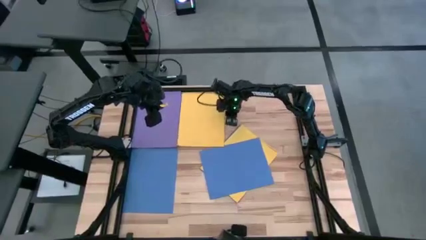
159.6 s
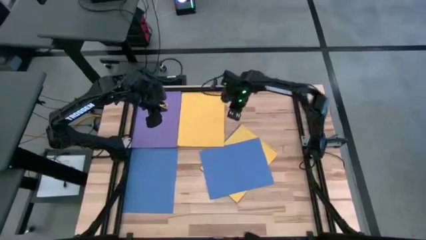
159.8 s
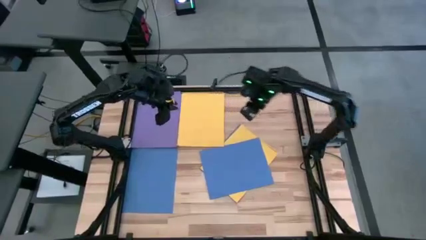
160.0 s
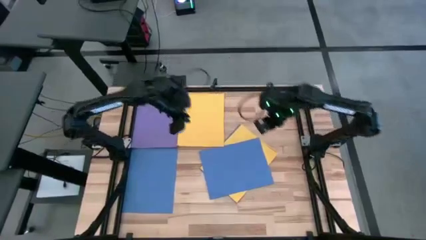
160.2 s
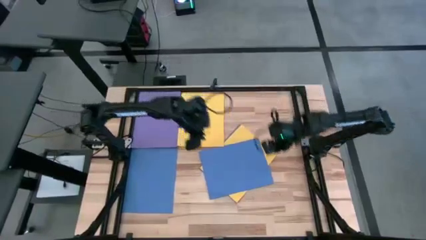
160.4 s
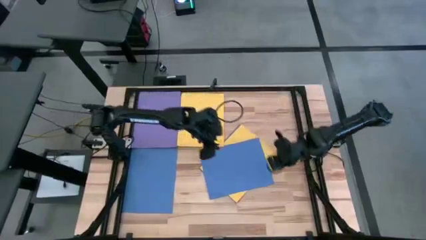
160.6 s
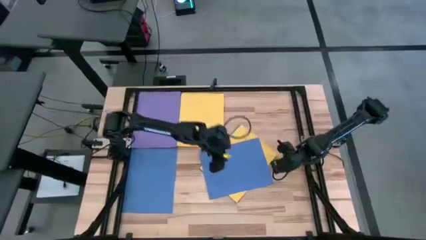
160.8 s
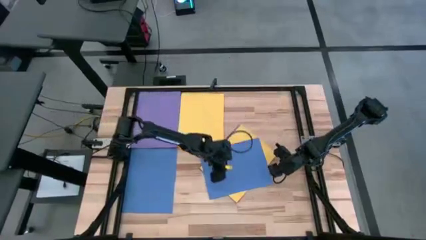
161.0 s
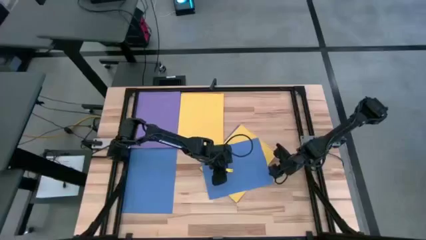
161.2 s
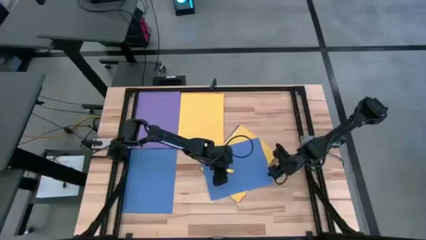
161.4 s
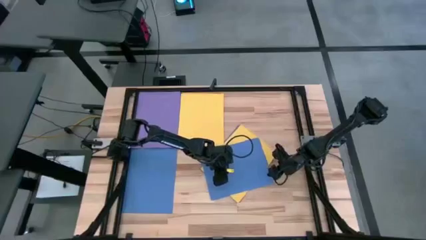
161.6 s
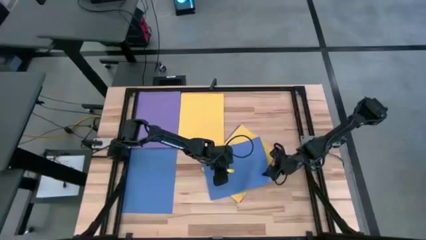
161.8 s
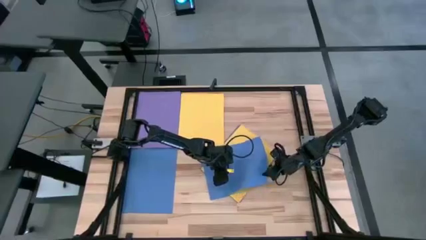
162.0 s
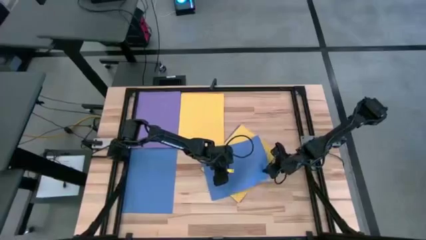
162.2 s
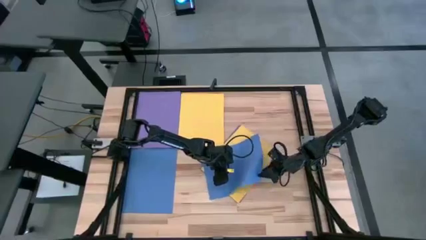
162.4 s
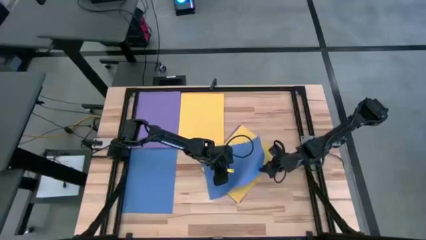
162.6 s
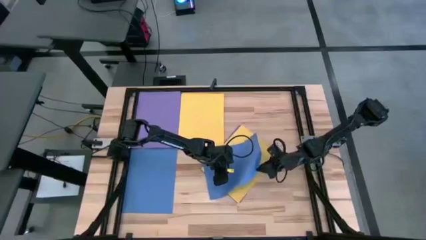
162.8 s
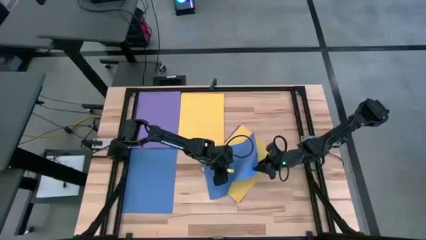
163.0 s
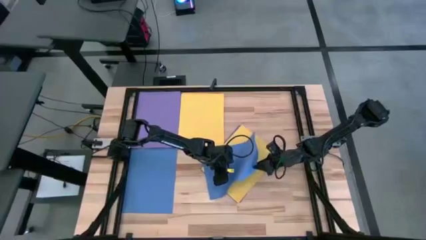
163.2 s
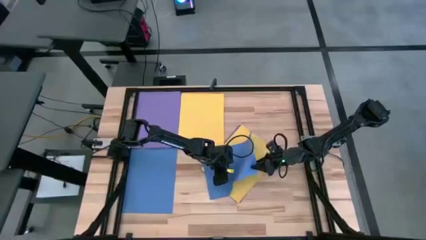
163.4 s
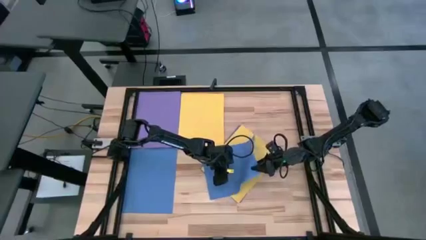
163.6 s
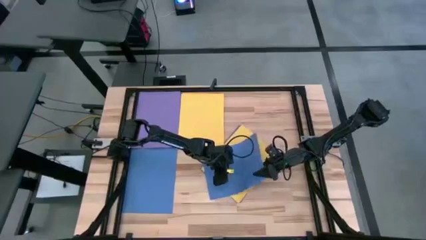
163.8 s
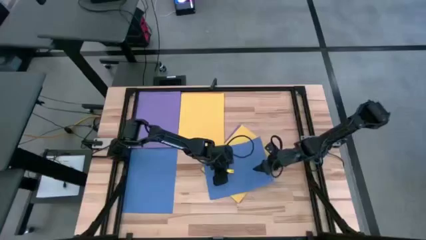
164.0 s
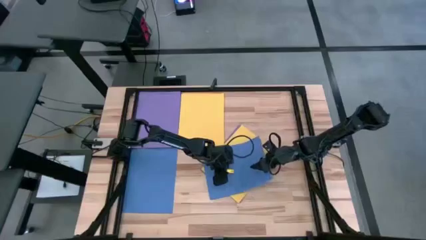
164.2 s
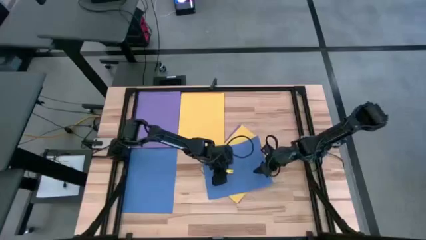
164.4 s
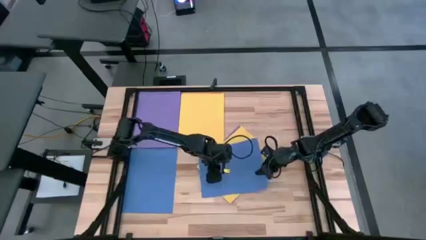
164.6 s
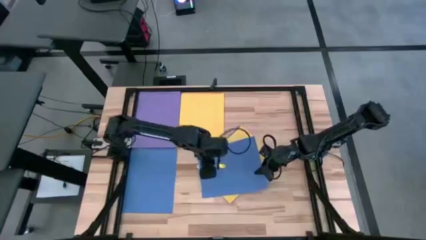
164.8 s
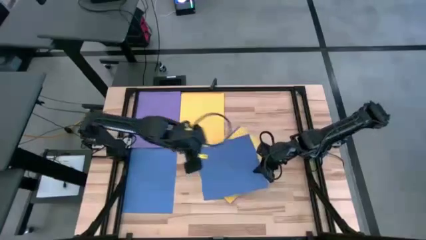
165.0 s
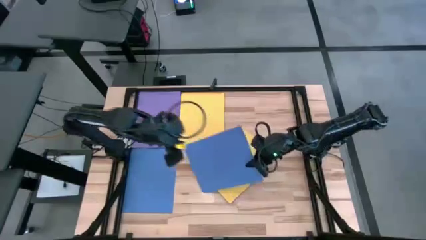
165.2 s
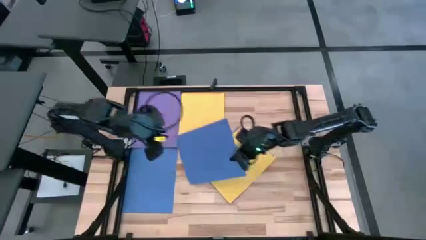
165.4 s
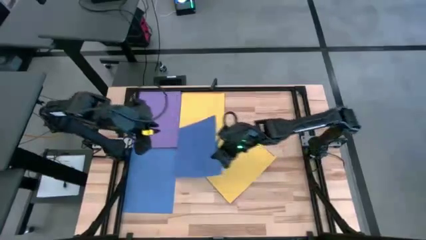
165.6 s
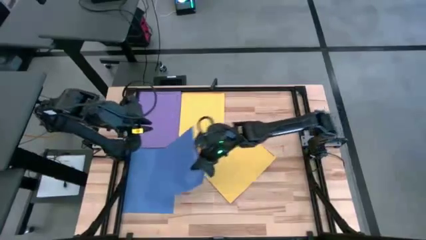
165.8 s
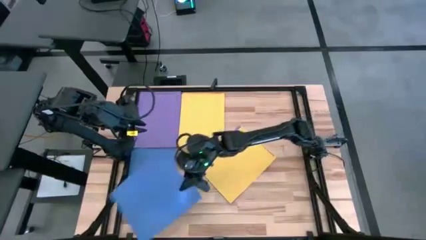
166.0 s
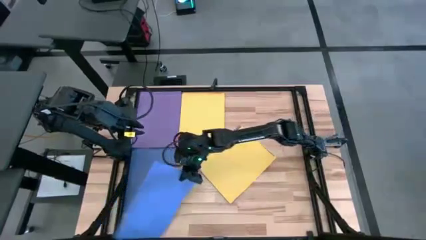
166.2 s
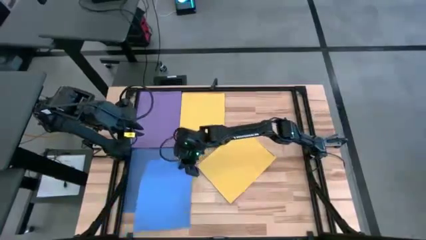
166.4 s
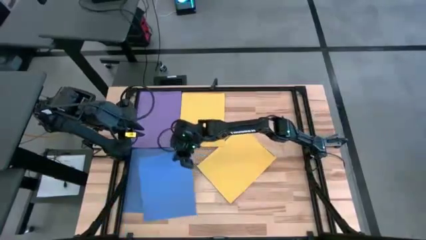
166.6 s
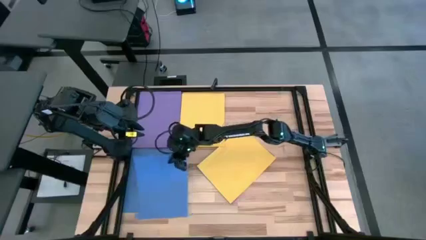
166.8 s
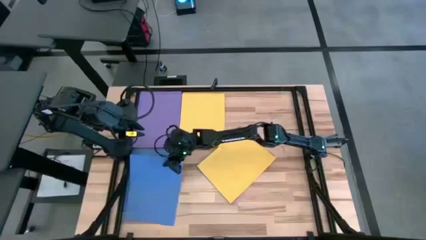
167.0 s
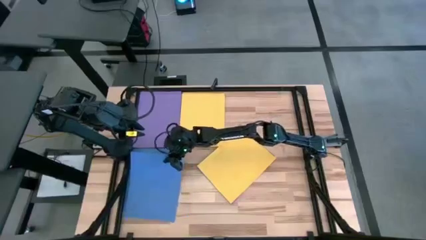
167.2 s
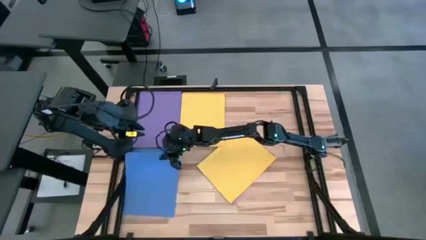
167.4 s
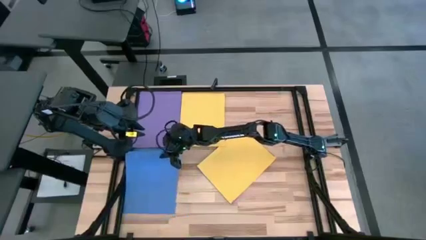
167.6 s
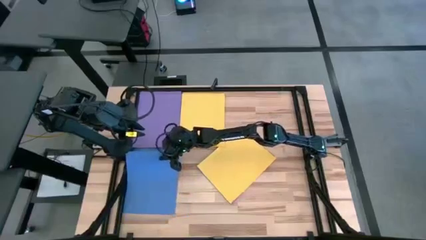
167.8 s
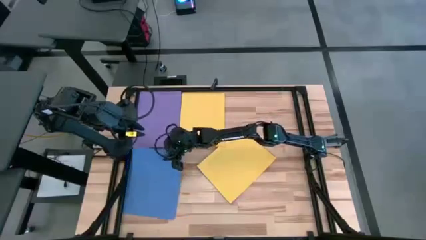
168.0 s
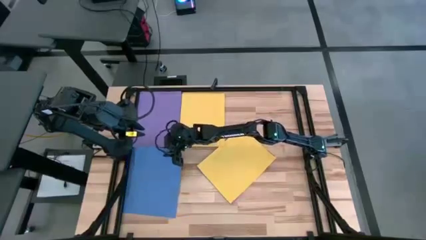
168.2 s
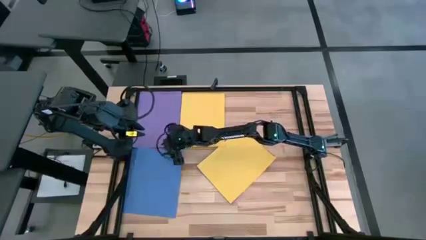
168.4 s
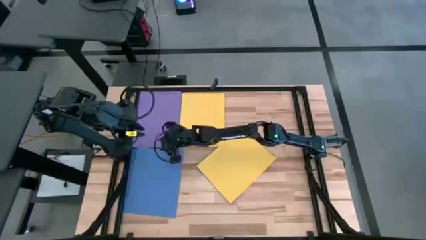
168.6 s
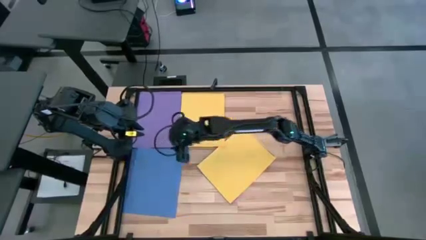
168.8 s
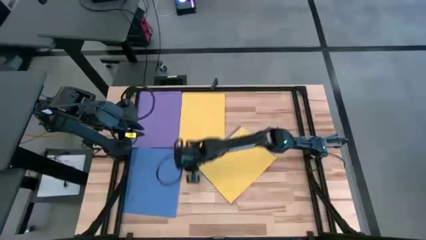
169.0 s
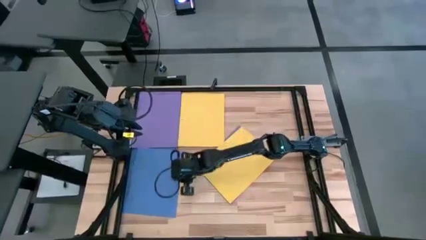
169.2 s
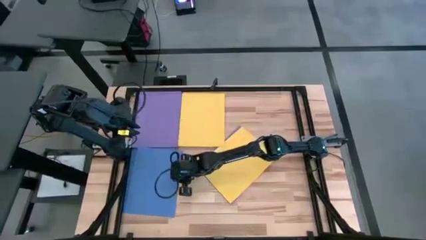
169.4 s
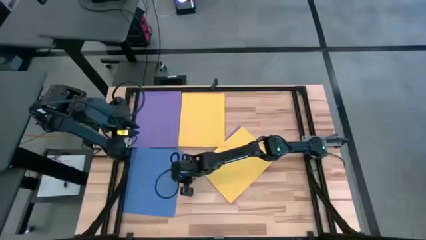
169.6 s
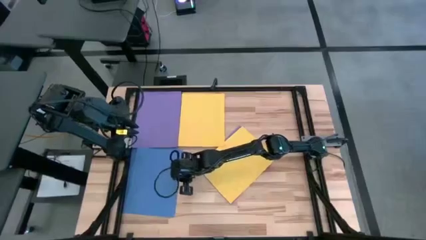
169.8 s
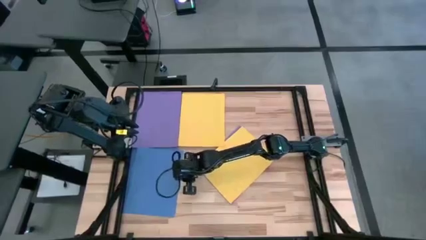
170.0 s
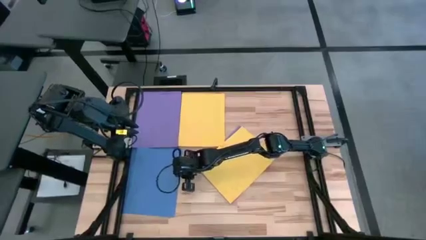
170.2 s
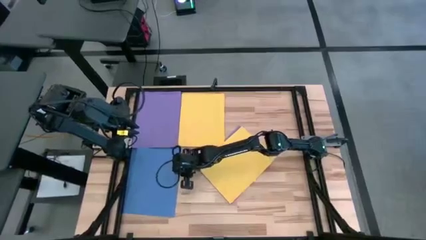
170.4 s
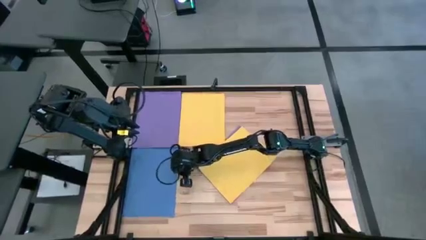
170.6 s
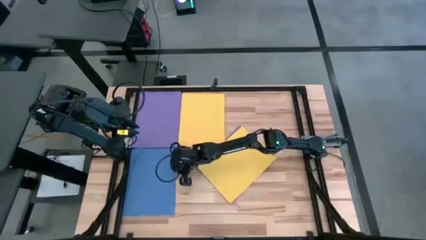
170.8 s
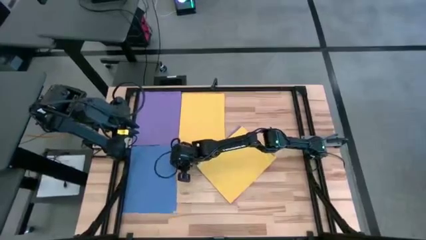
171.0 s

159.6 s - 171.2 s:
Task: Organize paper
Stack the blue paper on top of the blue paper

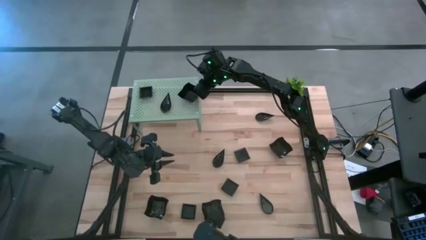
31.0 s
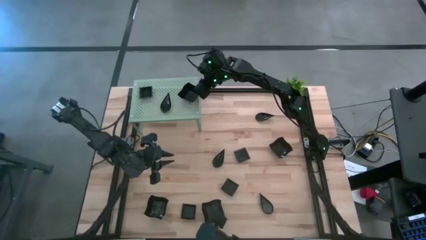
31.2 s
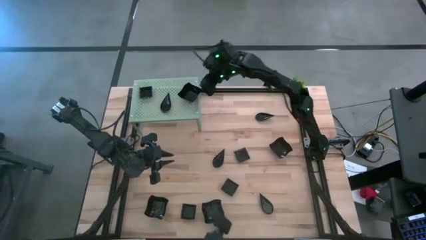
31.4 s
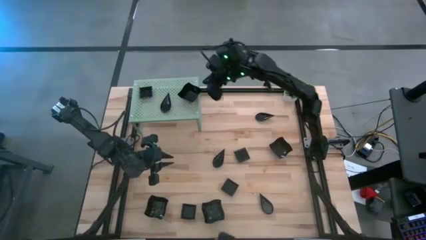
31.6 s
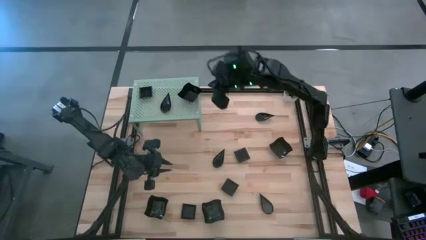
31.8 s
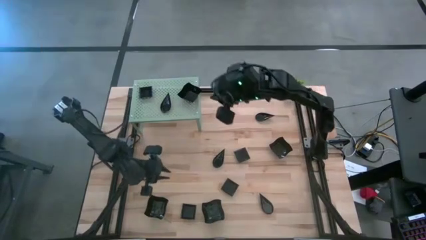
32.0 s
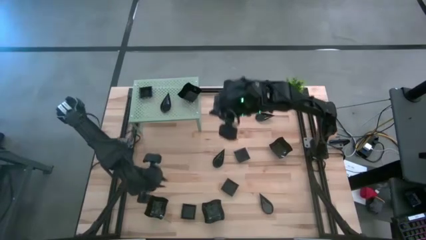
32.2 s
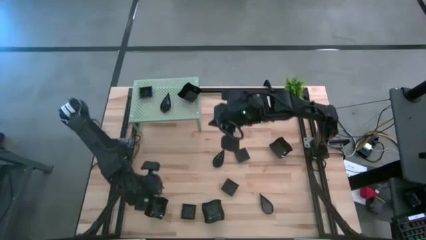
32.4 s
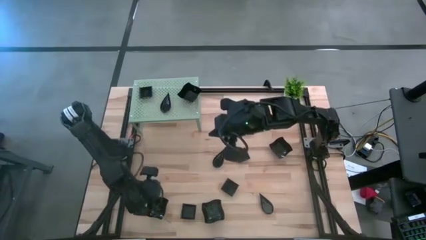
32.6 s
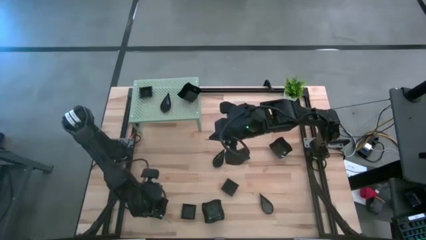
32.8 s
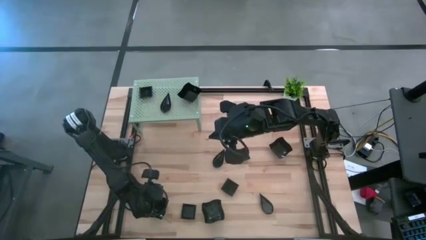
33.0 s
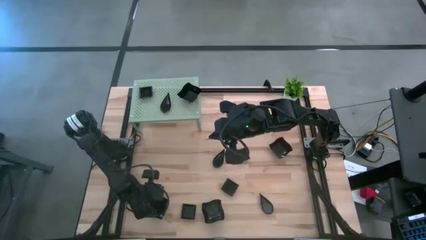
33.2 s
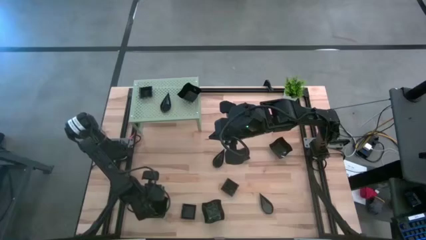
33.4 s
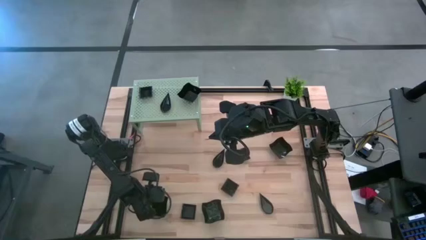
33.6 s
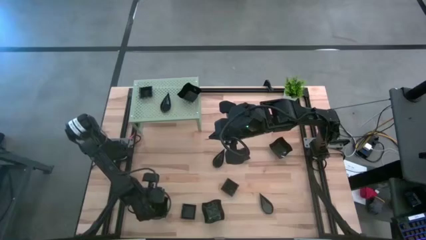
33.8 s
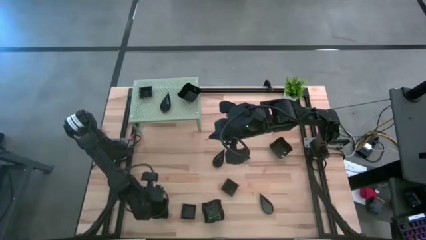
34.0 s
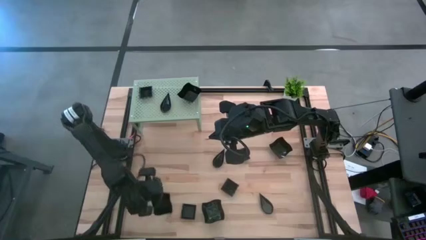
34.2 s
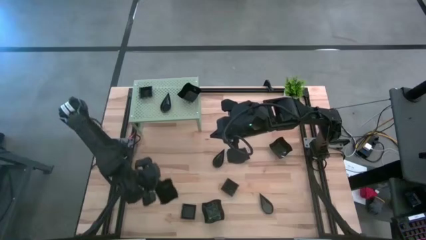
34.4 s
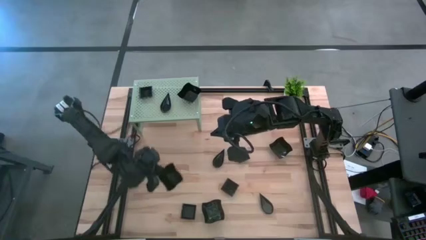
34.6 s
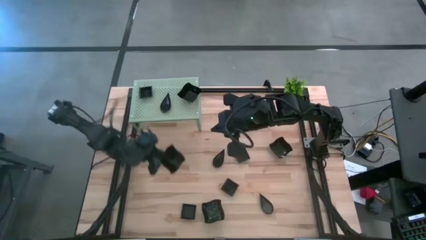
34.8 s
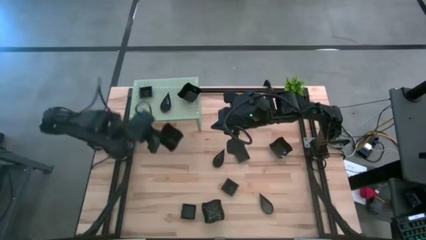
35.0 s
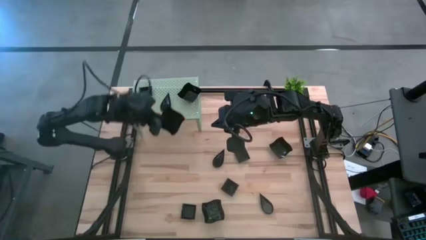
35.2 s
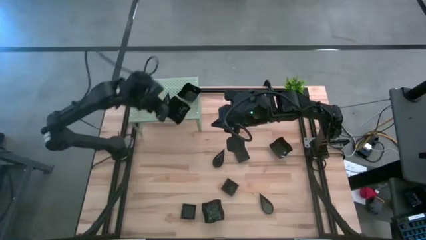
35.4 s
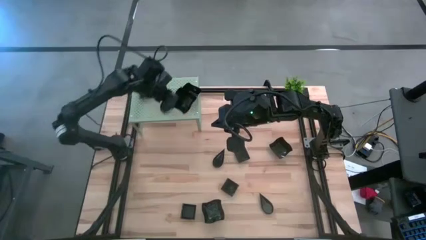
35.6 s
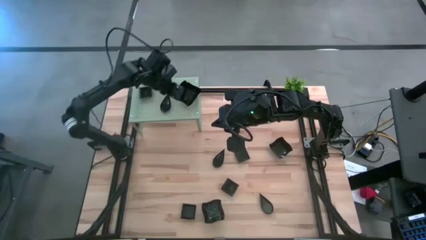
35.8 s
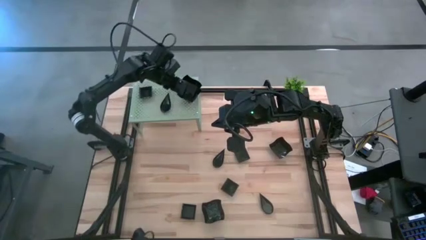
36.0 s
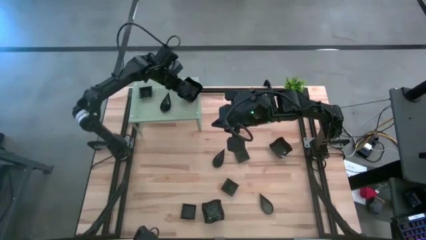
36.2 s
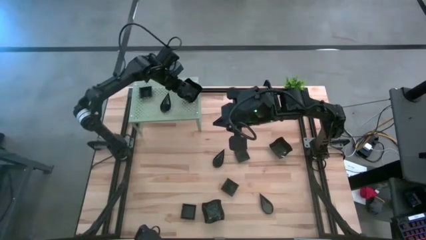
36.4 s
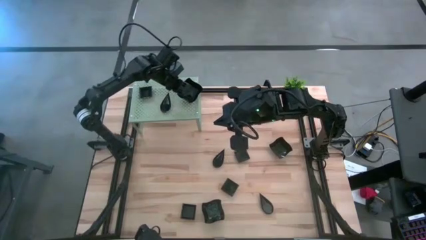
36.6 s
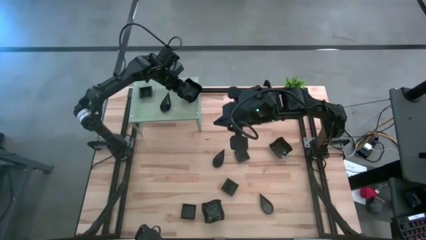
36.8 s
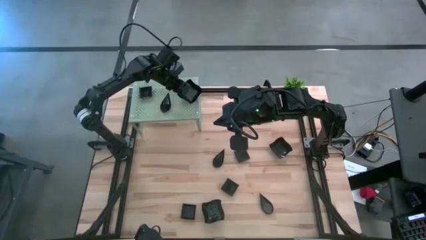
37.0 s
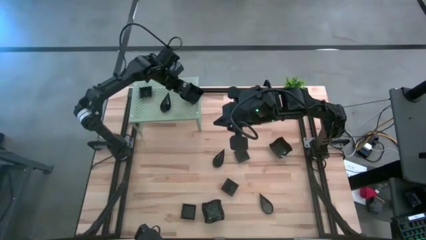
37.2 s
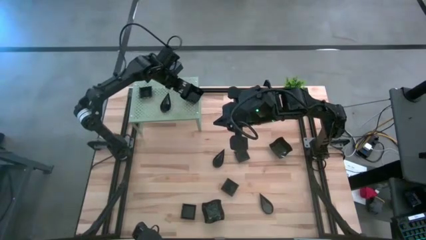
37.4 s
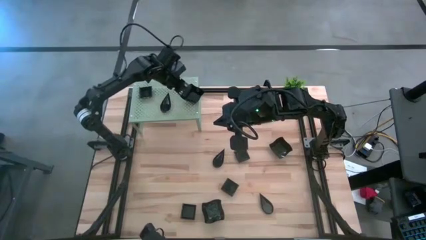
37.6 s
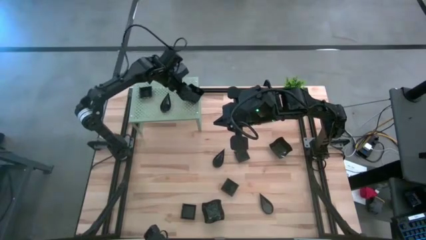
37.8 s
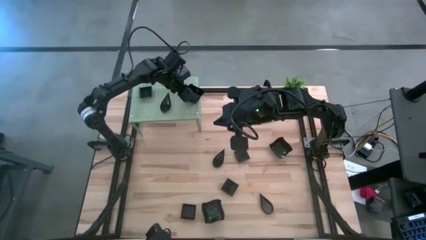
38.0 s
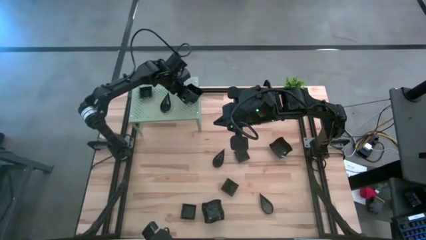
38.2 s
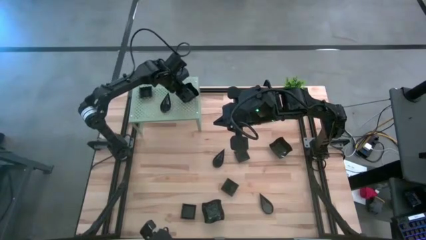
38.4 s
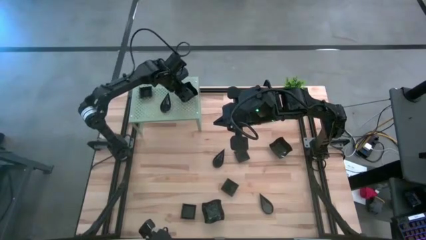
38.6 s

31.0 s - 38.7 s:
Task: Pick & Place Mini shaped plates
Stack the black distorted square plate on top of the black distorted square plate on the shelf
